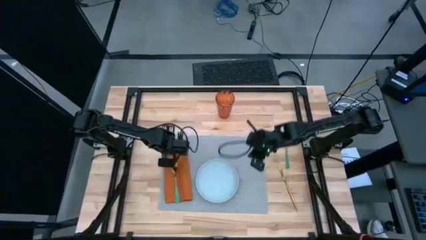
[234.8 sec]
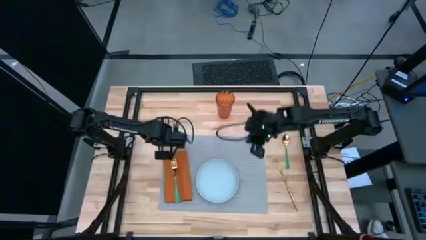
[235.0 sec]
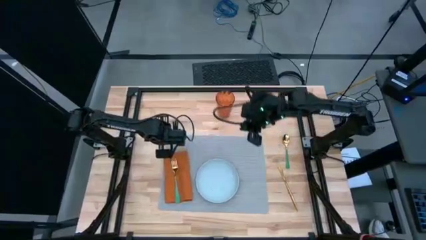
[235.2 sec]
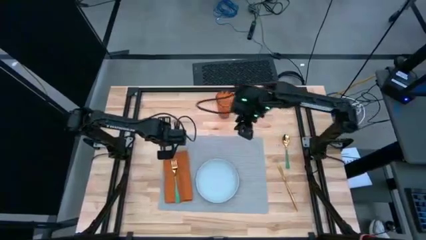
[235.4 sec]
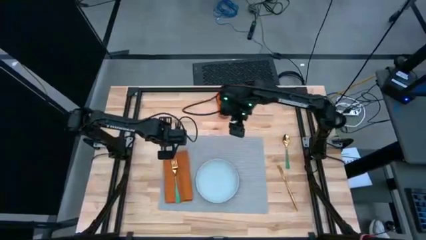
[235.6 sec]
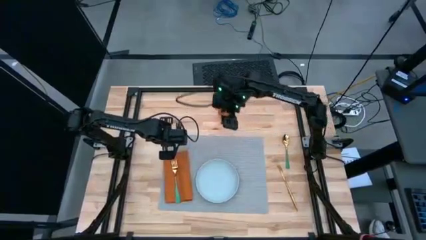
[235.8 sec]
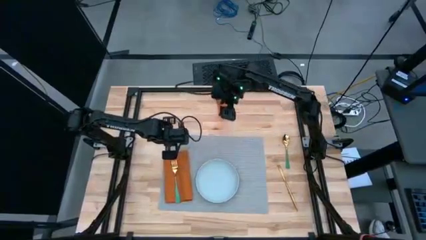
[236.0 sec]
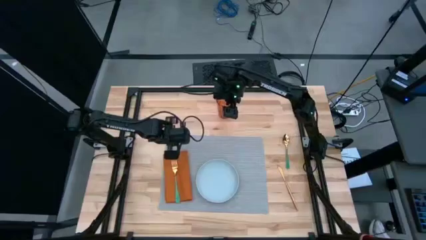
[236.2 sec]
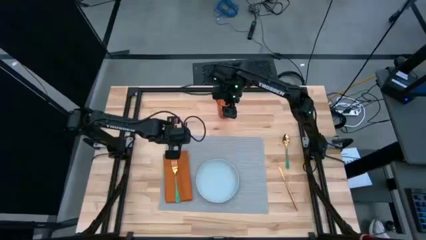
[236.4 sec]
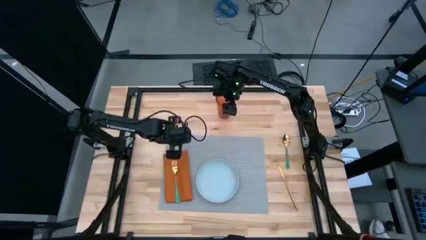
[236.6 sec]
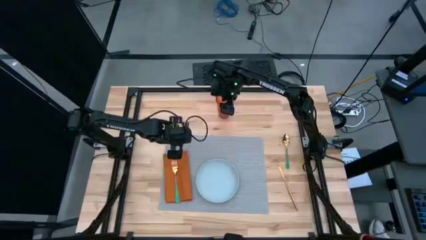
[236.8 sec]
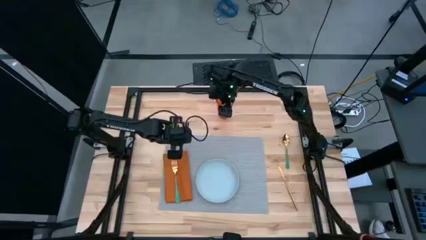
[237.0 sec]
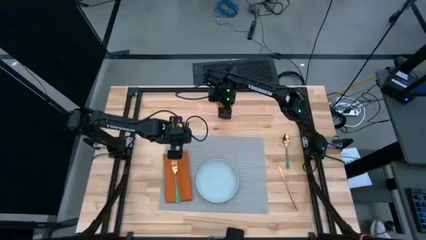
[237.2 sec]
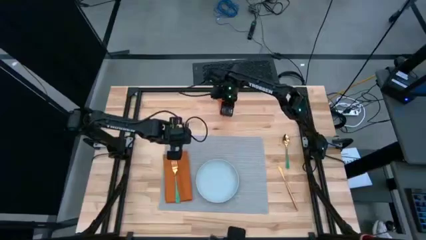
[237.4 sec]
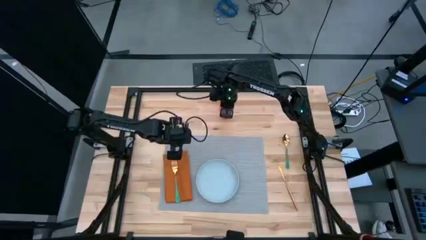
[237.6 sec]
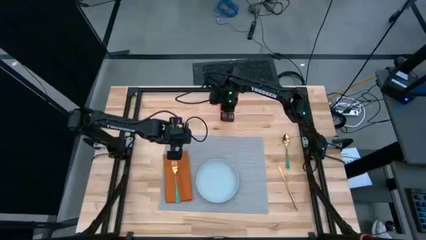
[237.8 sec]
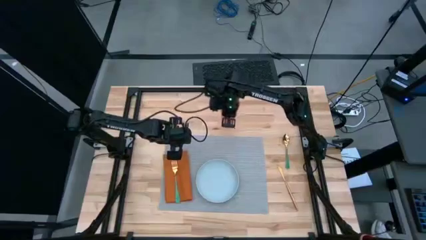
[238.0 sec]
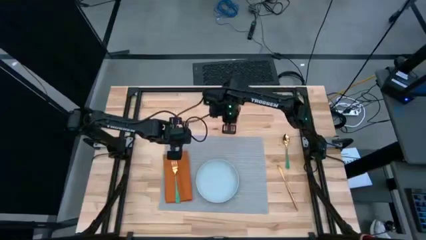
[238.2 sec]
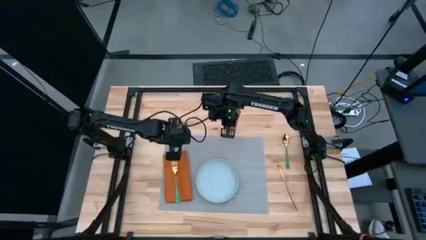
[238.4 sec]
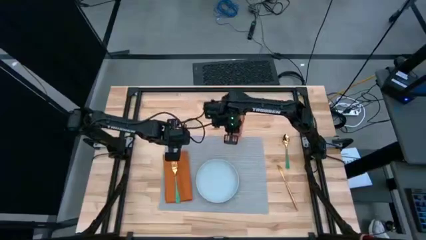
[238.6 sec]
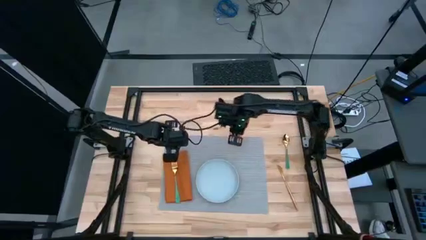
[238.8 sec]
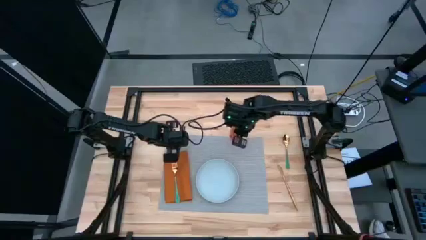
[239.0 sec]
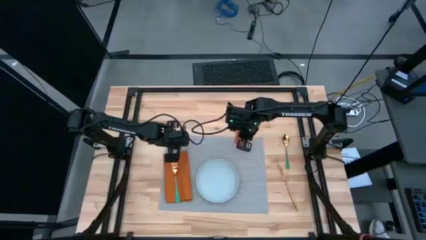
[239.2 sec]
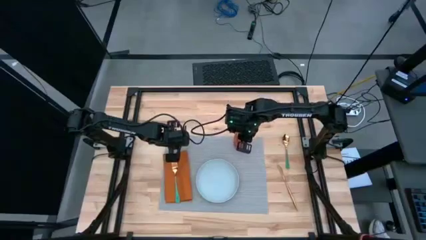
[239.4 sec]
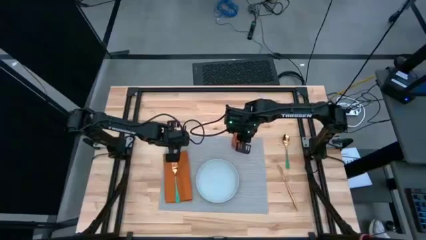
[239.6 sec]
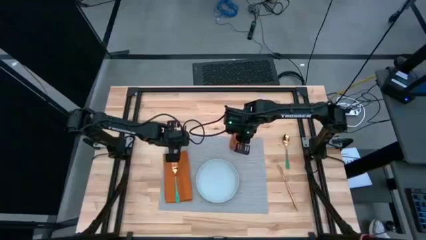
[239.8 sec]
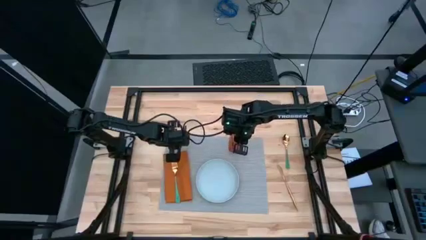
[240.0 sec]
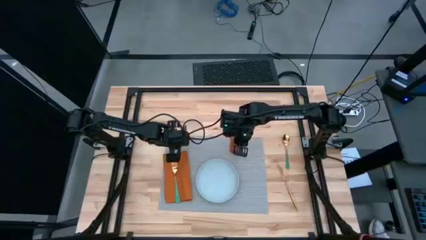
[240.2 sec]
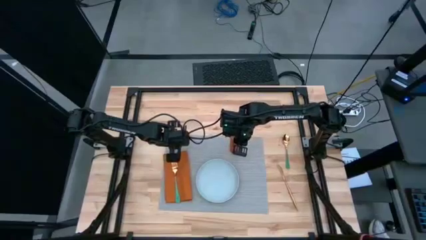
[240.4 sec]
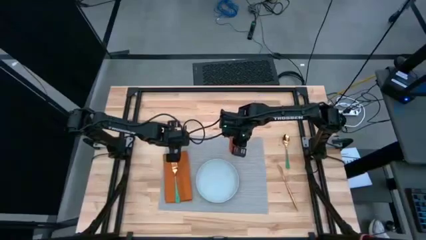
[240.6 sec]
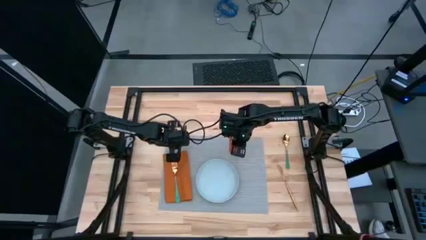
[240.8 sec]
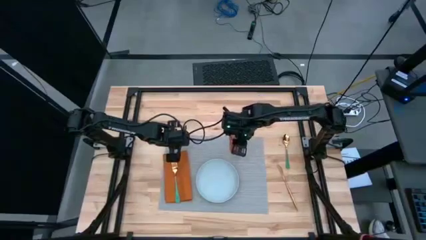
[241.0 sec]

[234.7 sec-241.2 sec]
Task: Set table place
Put the brown cup to the top left of the gray plate on the gray placemat

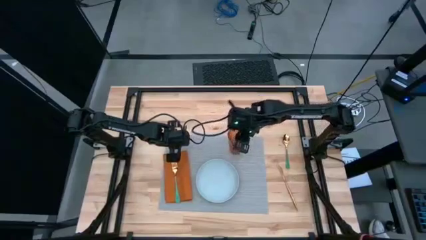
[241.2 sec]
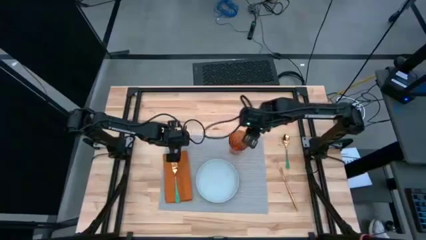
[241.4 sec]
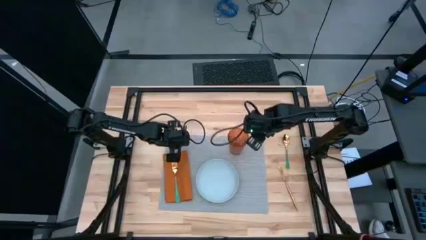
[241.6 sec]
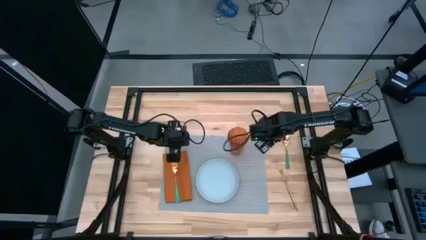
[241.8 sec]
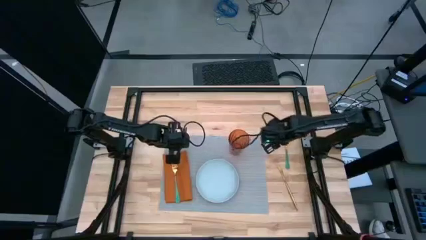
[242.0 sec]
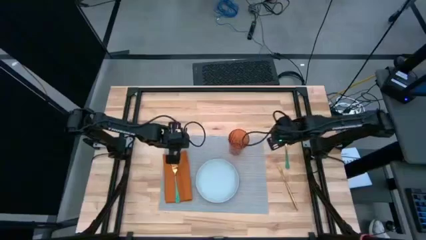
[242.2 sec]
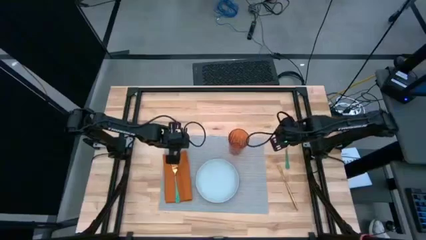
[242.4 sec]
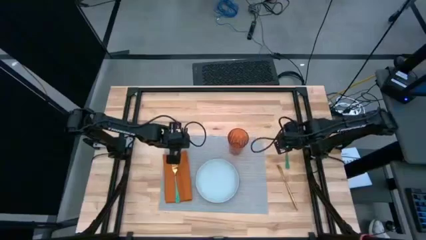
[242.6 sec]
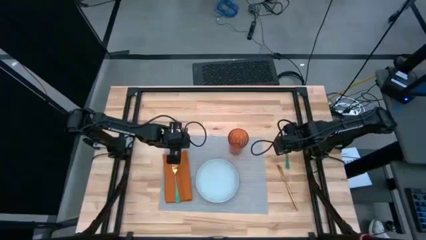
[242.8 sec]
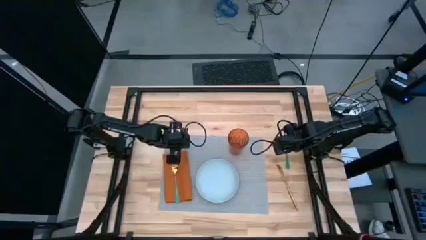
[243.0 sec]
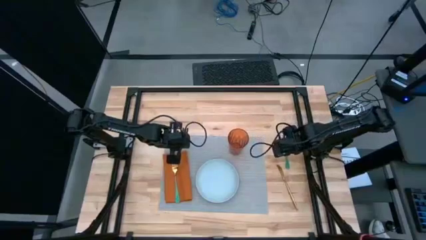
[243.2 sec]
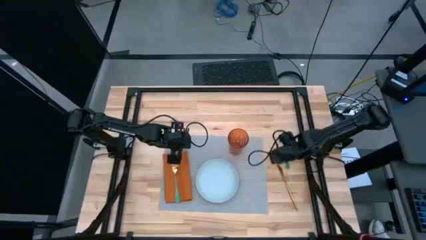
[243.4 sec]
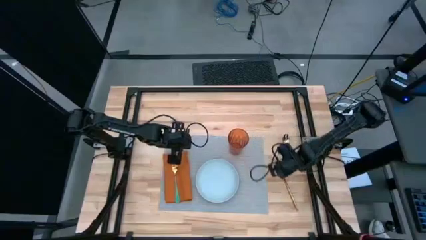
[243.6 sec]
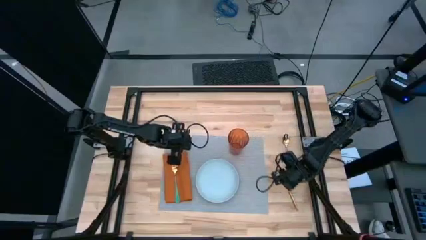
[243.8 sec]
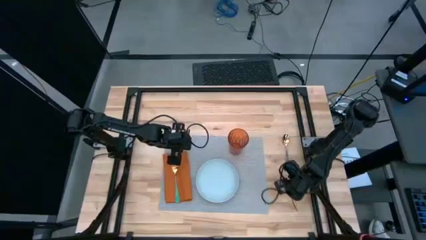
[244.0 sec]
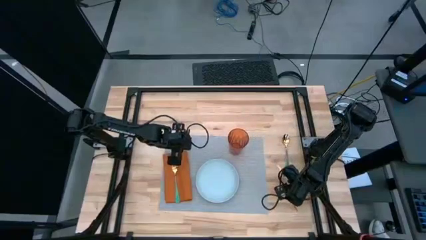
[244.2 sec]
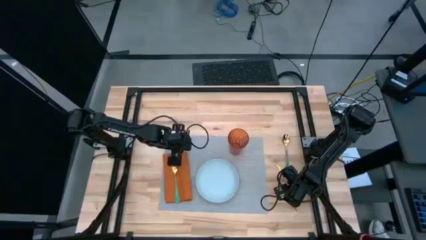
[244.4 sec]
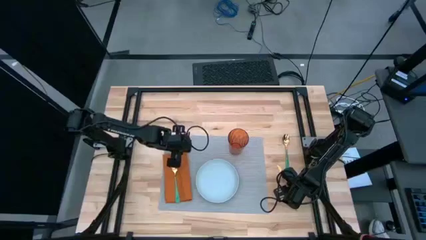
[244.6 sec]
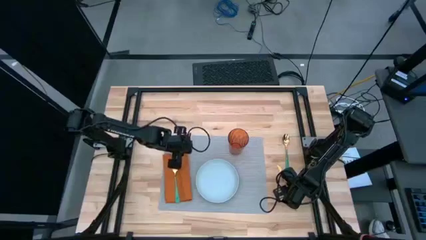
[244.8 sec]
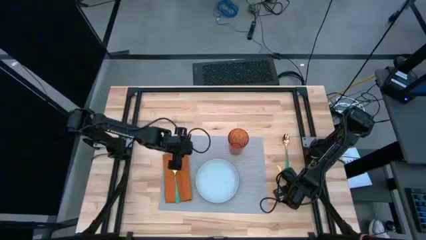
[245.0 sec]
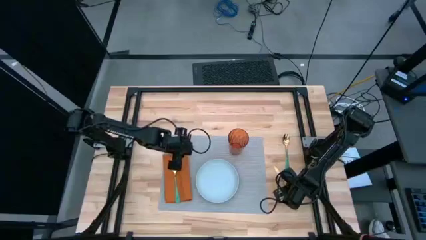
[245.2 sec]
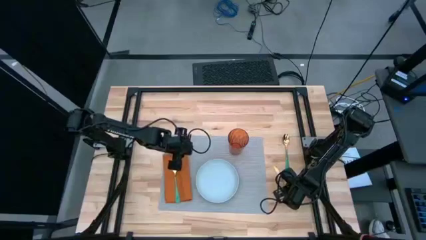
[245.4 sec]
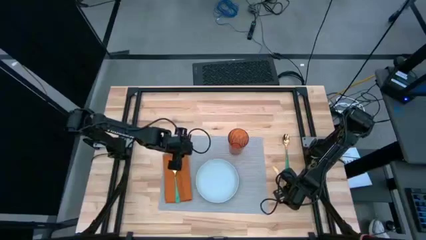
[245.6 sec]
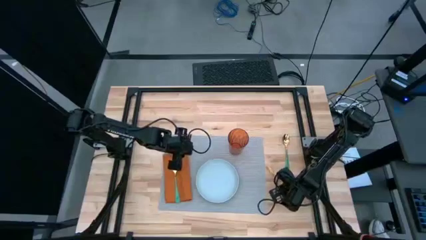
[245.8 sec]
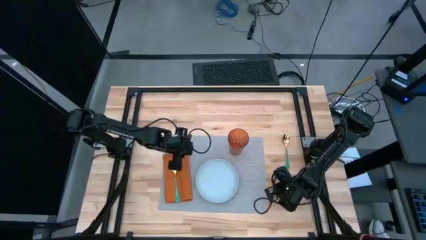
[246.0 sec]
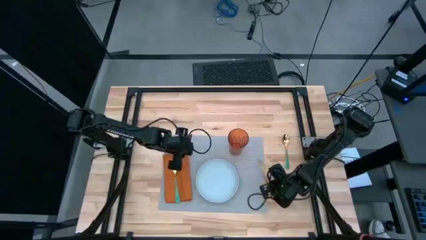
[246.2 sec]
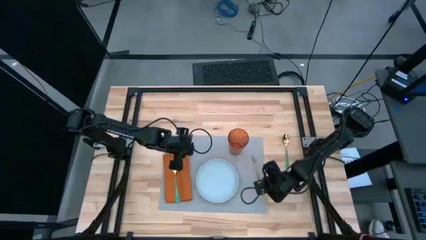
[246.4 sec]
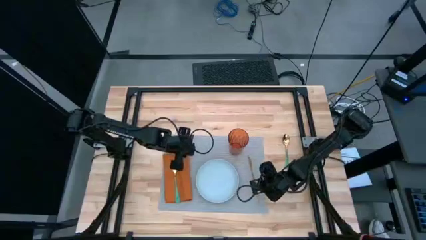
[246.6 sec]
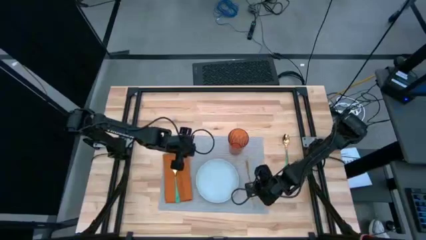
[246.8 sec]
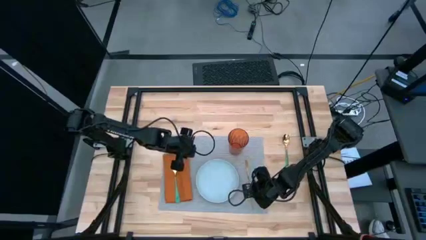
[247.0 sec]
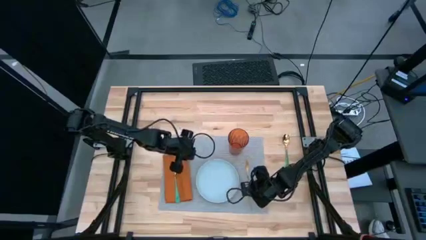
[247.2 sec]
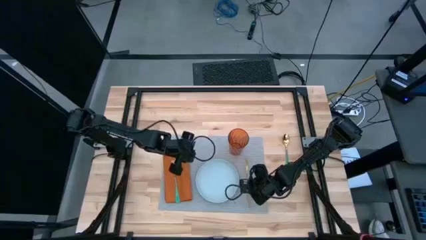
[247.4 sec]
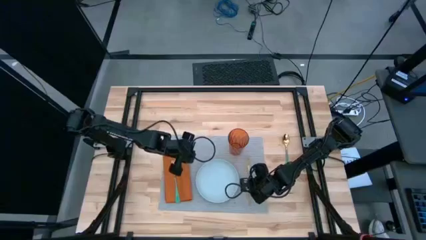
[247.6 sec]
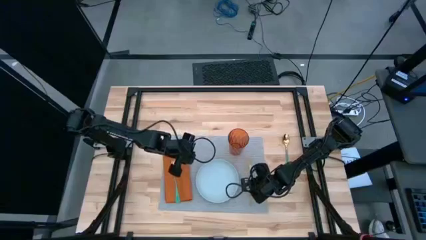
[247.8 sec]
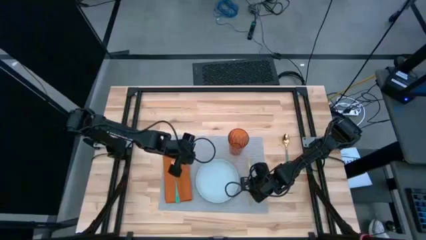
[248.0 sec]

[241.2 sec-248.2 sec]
Put the gold table knife to the right of the gray plate on the gray placemat

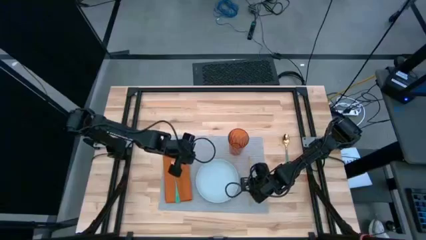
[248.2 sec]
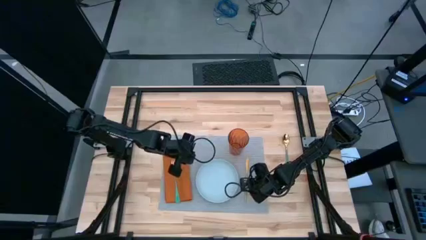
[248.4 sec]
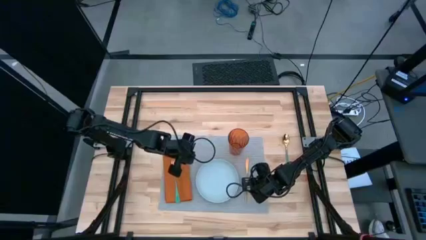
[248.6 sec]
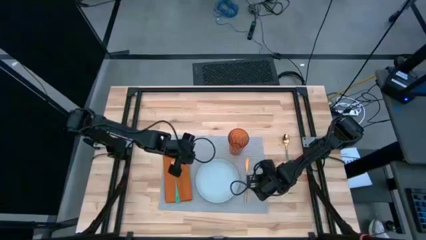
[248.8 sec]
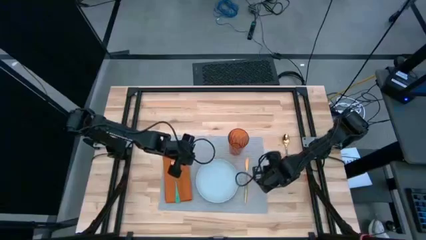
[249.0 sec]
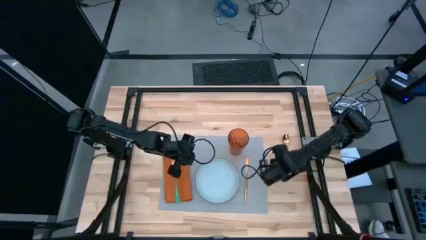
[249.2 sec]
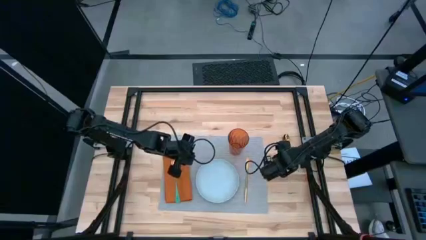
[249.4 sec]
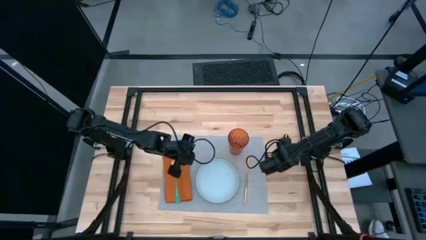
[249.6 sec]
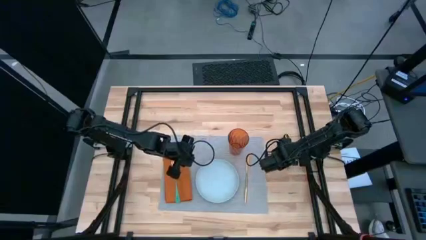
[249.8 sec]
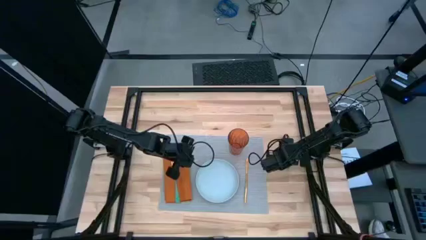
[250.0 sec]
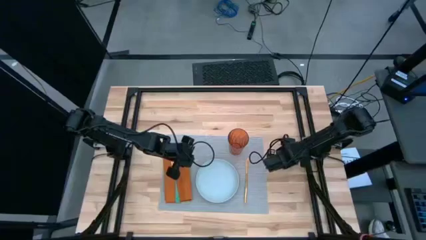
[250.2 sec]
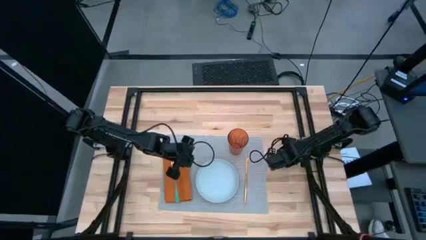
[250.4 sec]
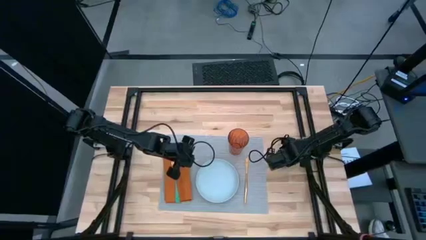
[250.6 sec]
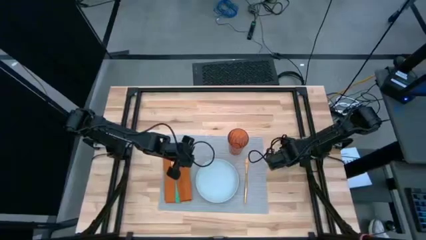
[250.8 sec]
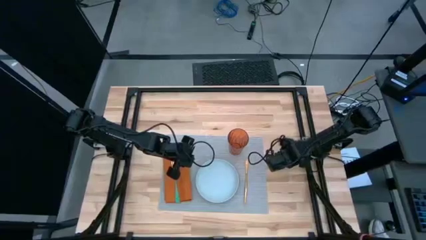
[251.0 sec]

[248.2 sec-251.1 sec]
Put the green spoon to the right of the gold table knife on the gray placemat

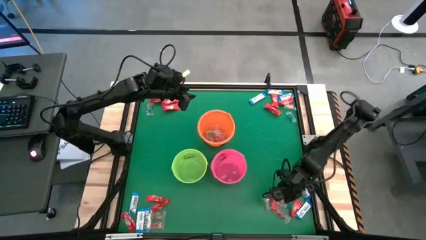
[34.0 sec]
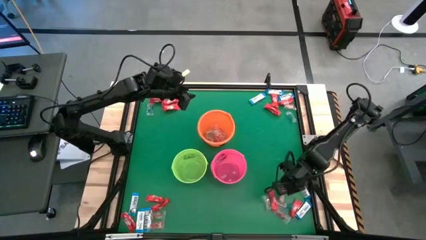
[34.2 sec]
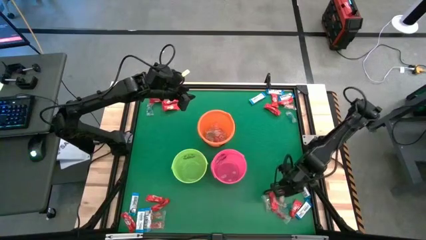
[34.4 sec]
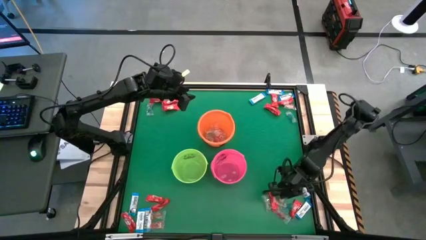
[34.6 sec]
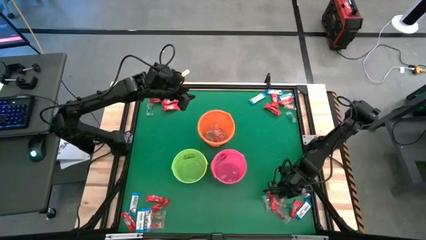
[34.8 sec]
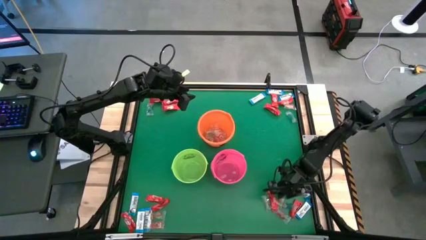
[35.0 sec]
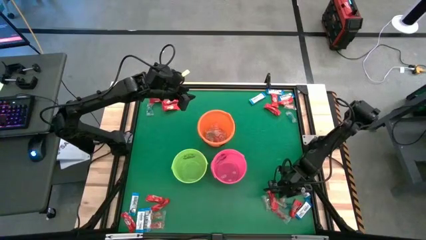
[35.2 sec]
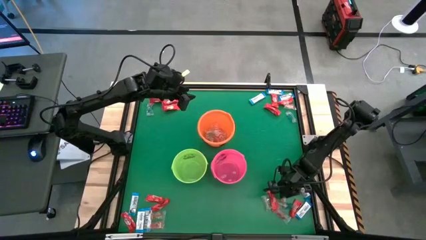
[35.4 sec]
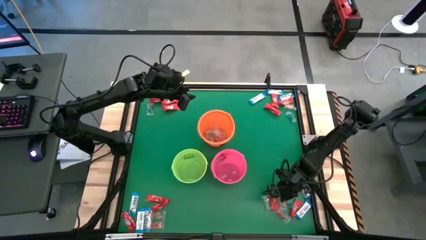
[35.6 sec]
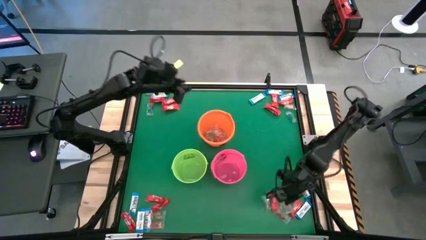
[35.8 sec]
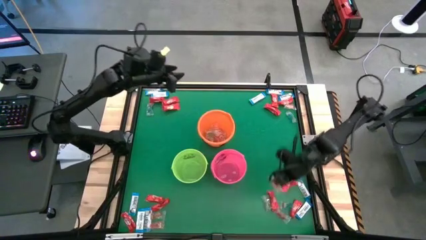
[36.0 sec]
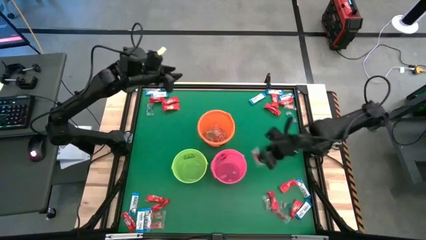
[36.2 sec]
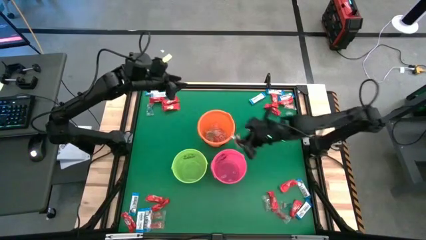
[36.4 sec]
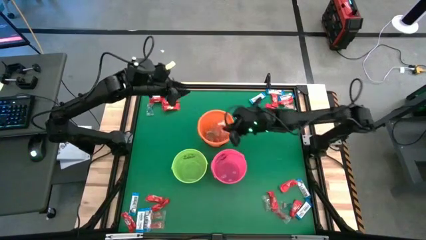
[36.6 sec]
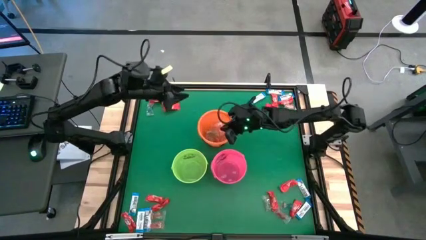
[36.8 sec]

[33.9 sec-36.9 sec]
Task: Sort candy by brand, put in halloween buckets
Put the orange gummy into the orange bucket
